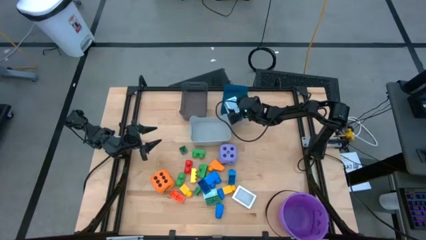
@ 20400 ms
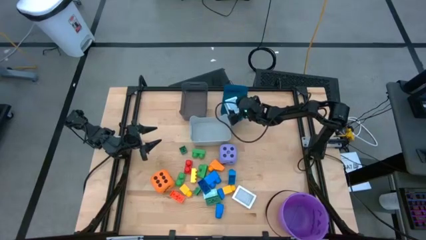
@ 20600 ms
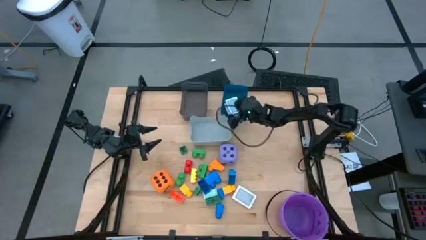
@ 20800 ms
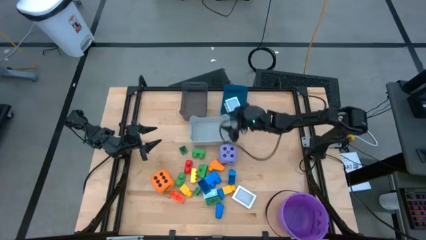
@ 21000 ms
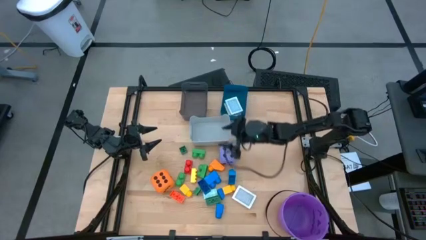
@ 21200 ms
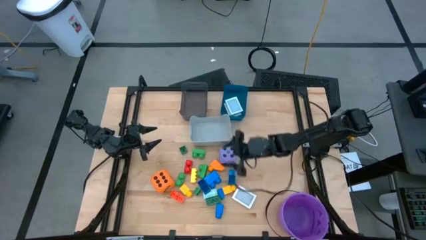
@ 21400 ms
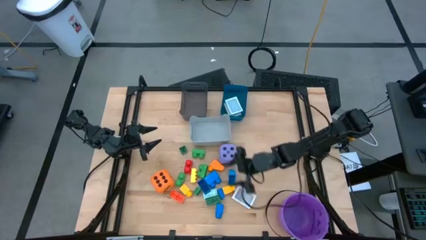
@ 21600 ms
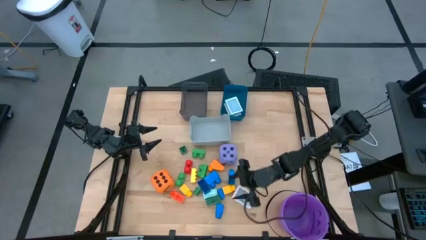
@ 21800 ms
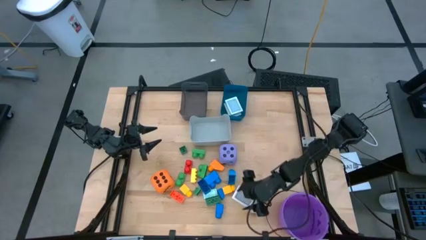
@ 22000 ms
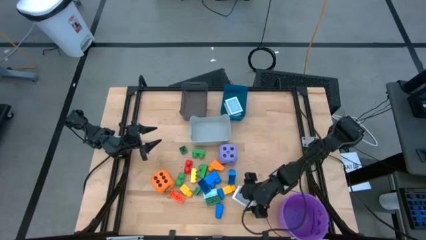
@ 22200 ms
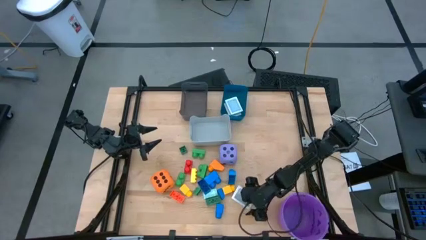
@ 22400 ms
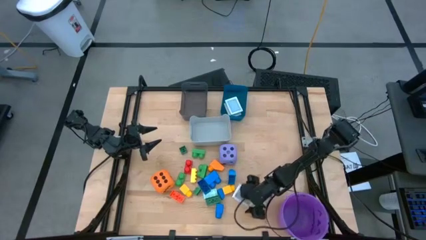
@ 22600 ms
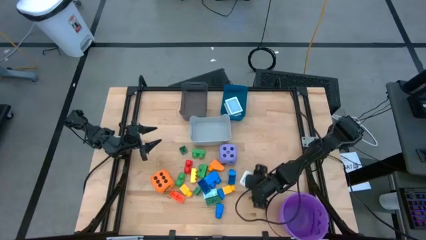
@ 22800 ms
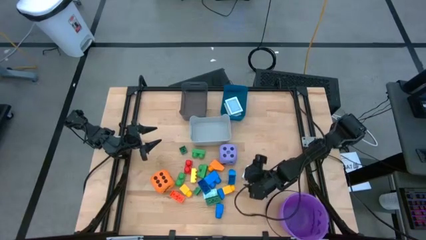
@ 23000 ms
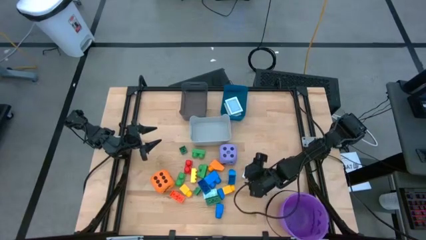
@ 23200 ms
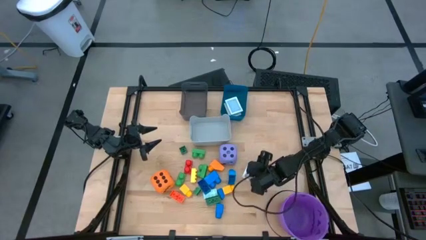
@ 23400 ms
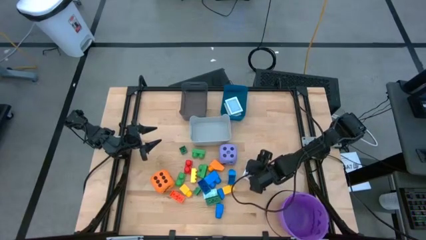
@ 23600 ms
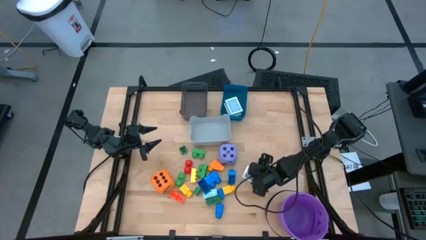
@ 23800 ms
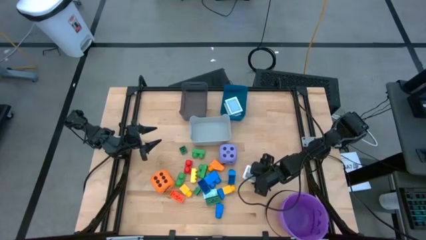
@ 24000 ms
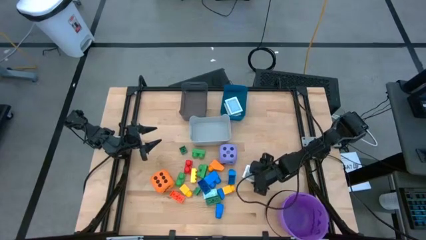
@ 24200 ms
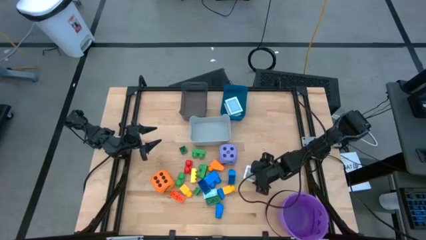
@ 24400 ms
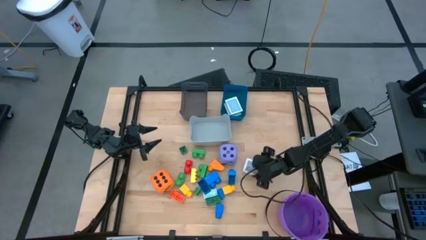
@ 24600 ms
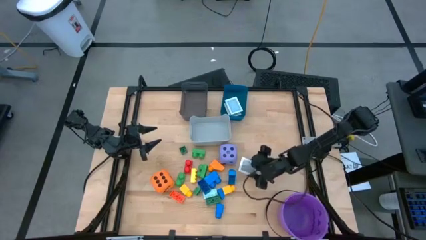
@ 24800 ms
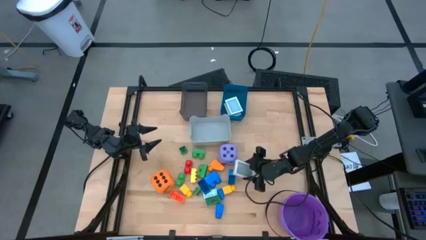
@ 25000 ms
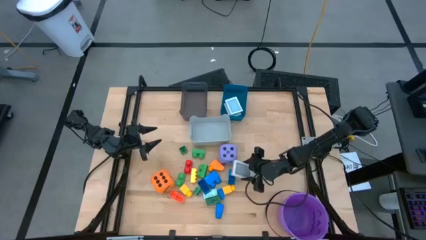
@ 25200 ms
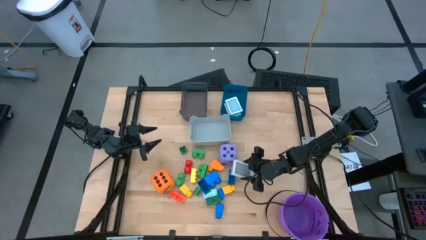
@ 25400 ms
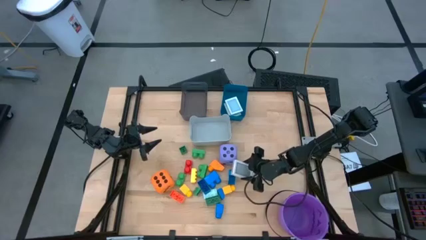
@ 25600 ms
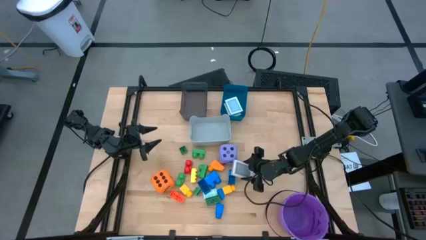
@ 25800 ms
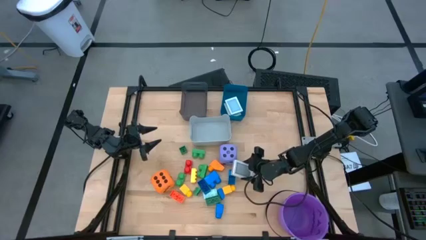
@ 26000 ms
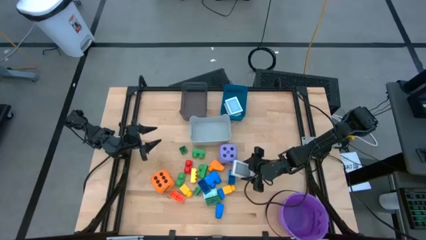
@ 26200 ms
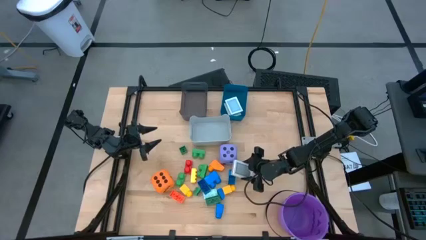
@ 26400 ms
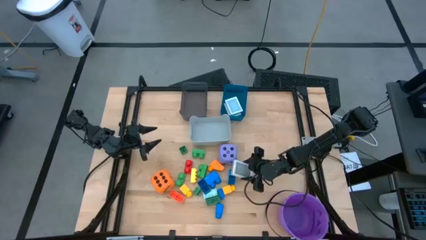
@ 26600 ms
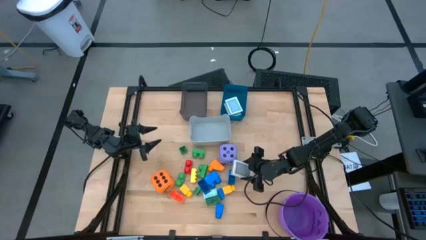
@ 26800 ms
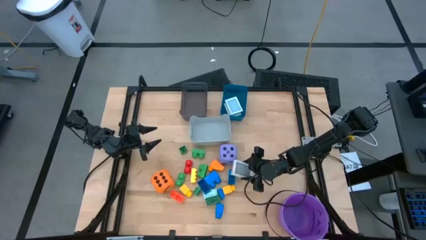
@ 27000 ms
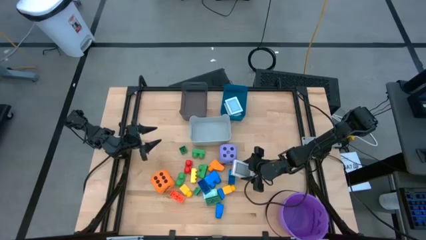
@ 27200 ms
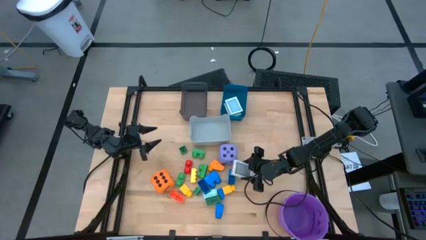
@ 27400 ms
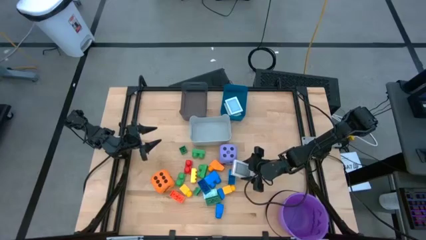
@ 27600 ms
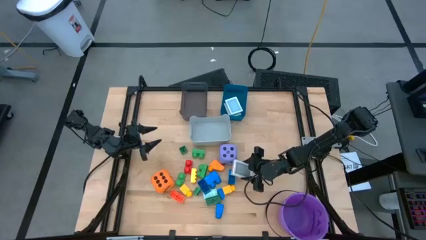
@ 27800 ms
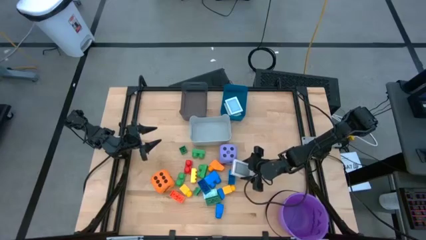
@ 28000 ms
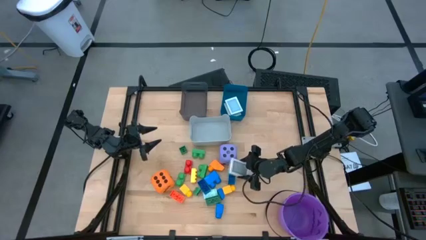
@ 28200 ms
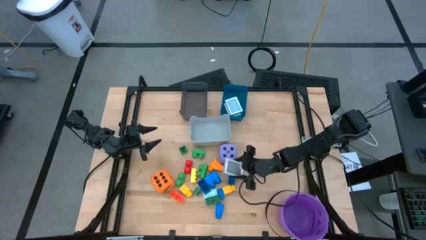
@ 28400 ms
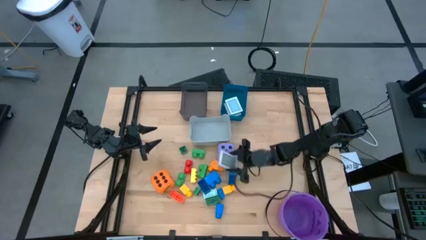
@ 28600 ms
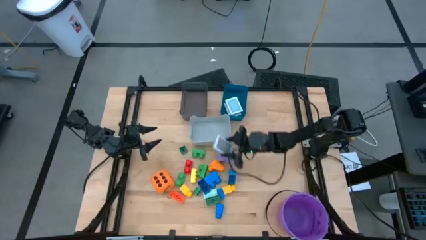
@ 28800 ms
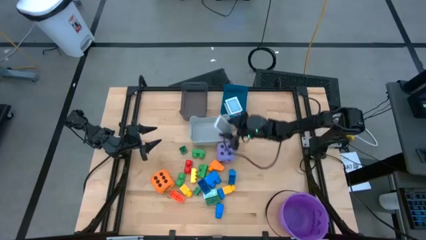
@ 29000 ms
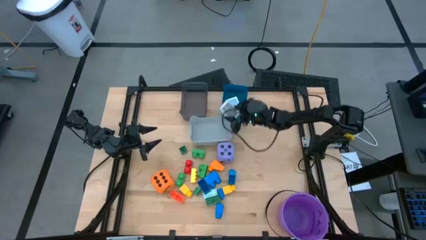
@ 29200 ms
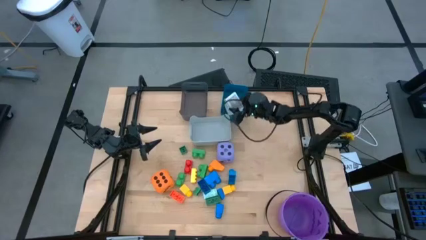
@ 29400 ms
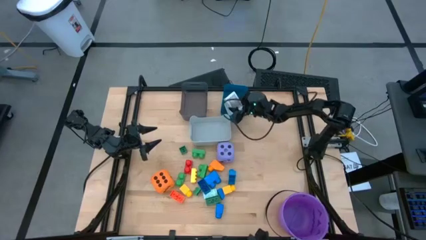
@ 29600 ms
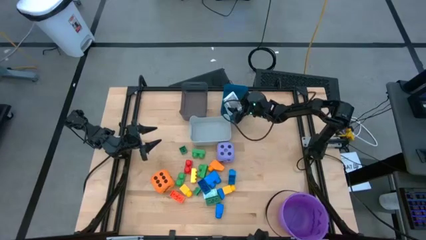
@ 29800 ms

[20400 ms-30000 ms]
Task: Pick & Place Toys
Put the black deck of cards into the blue bin

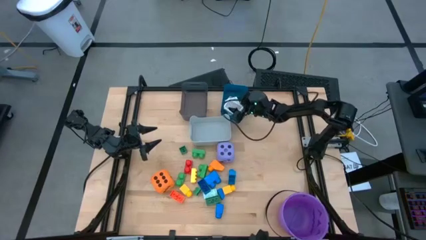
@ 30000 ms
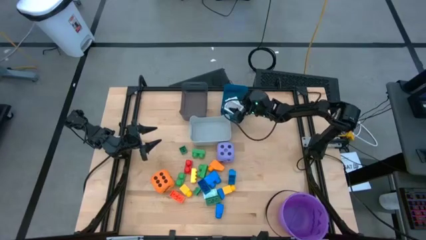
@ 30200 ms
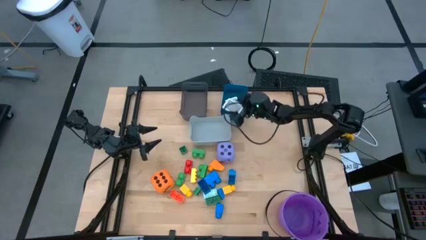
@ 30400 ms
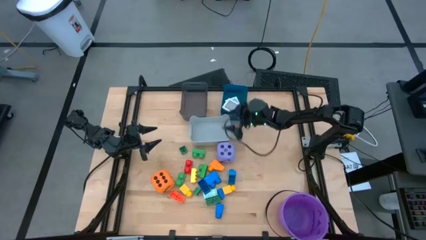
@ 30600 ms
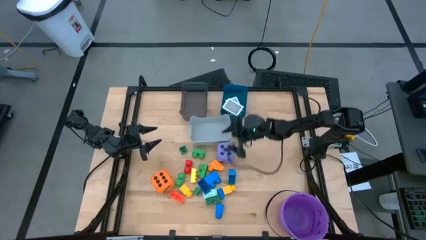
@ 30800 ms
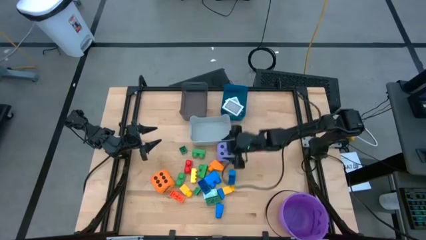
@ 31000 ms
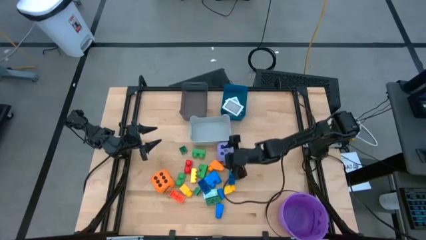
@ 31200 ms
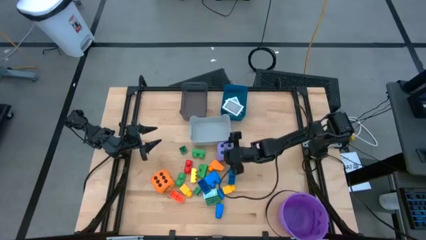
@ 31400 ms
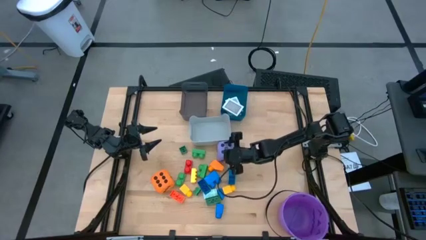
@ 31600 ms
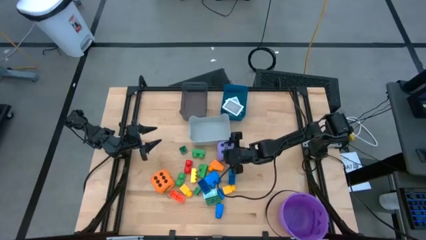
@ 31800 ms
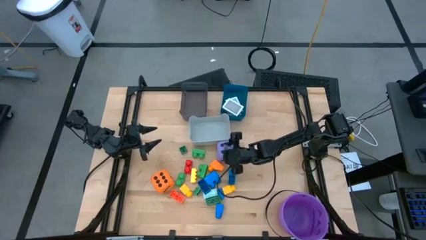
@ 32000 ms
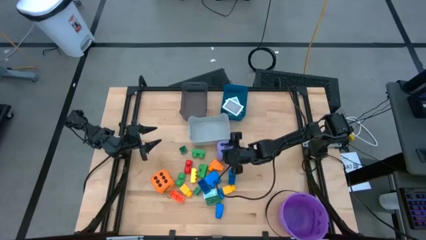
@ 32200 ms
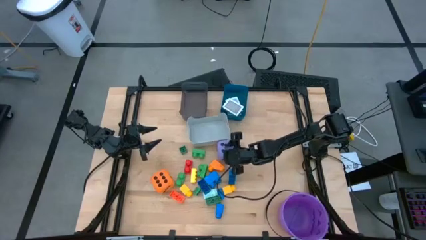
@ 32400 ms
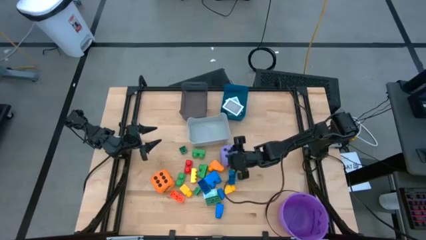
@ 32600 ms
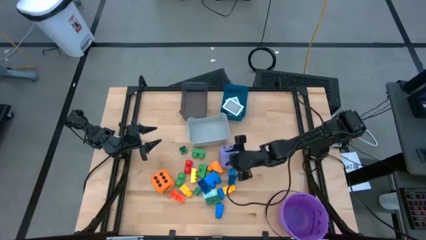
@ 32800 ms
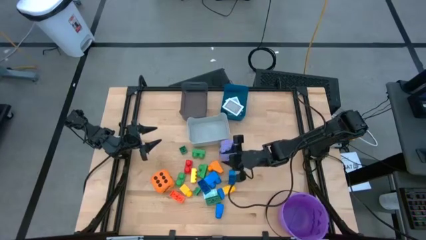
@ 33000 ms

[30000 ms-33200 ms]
Put the purple game dice into the gray bin

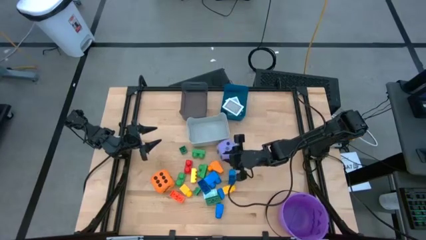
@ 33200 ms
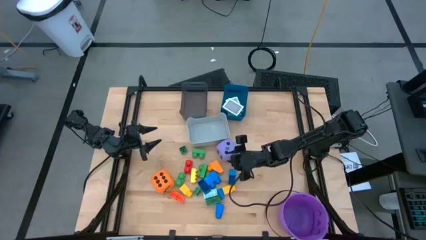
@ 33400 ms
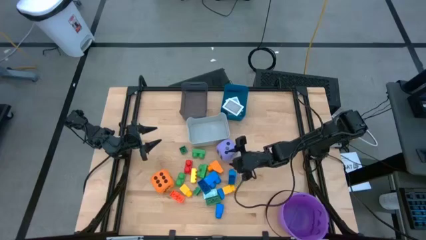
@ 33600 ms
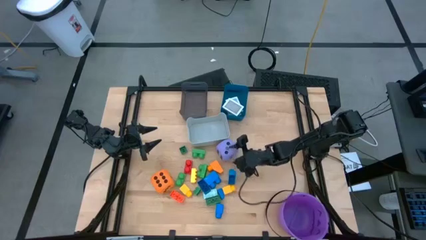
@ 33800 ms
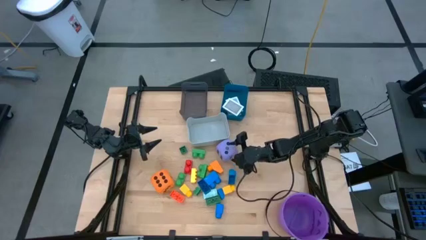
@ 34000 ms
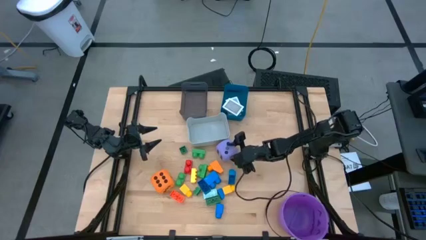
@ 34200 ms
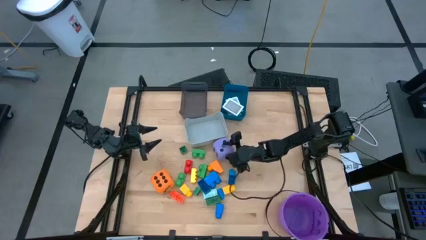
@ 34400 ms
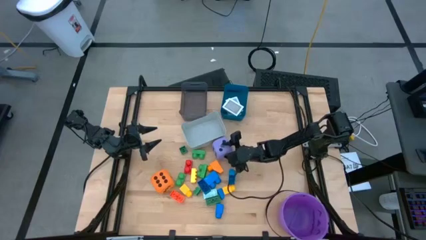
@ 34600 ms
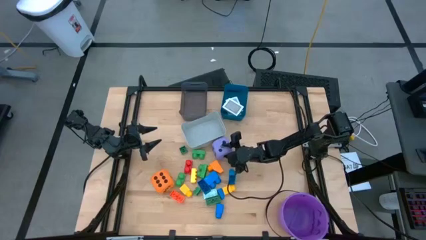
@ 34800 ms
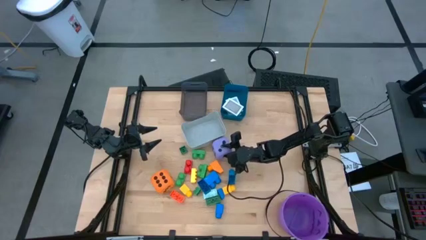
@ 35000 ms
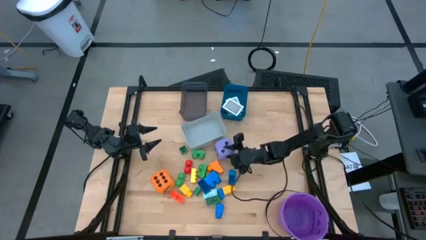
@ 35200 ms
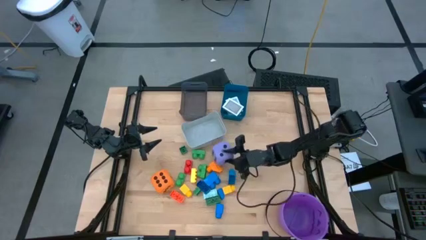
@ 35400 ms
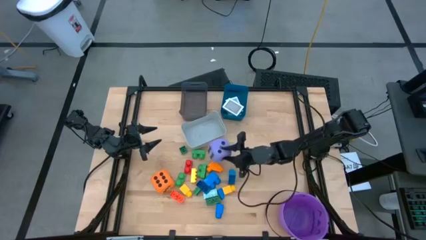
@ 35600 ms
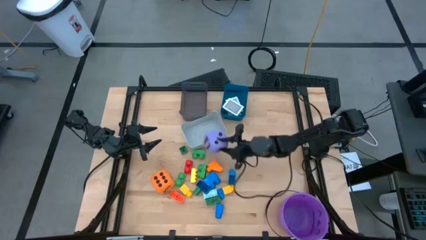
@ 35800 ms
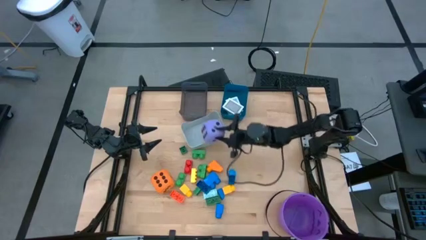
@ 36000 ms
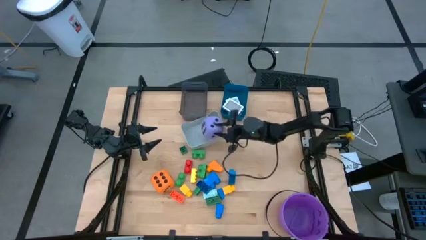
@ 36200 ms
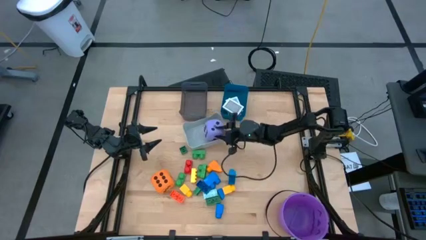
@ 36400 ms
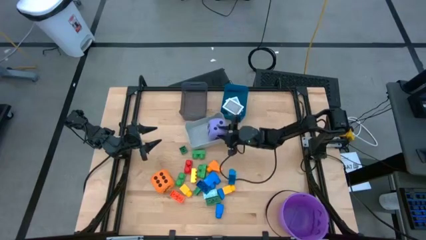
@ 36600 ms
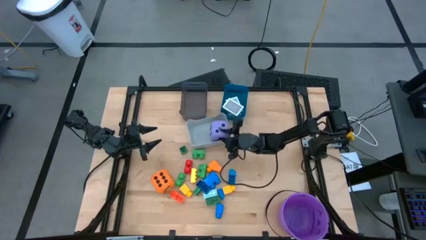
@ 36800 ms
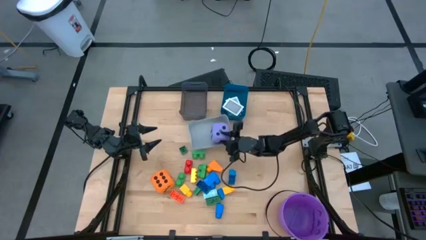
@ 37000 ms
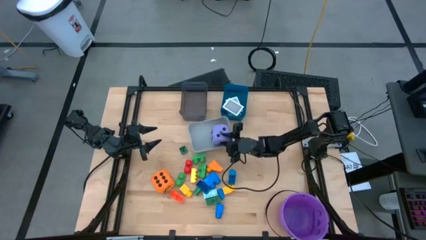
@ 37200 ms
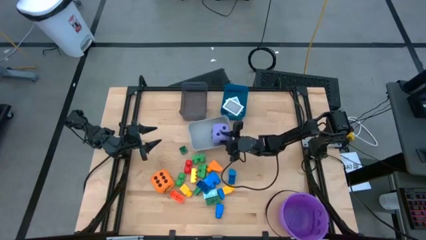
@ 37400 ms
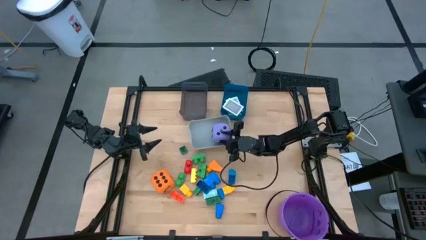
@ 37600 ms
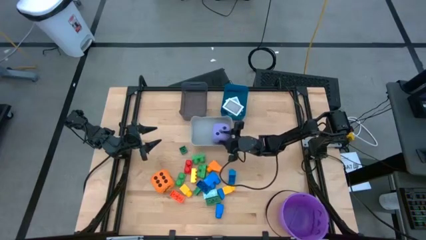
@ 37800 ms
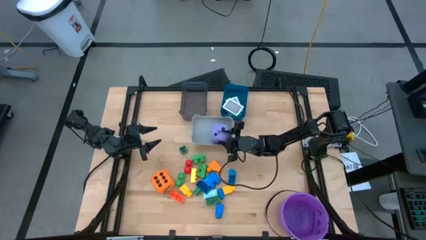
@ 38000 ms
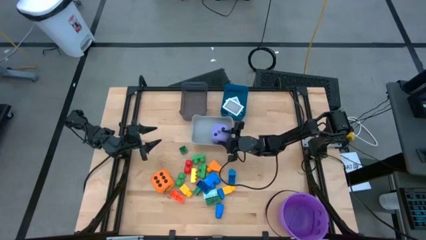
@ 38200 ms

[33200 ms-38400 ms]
Put the purple game dice into the gray bin
